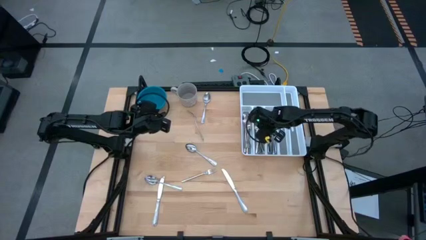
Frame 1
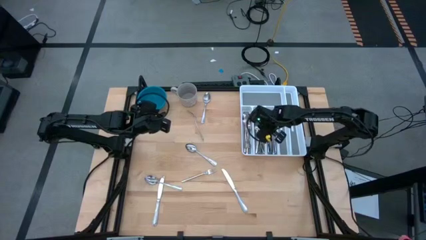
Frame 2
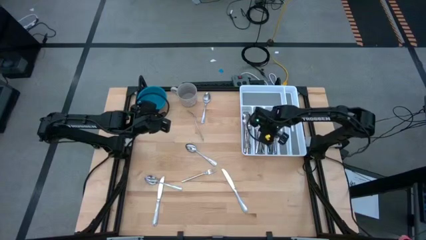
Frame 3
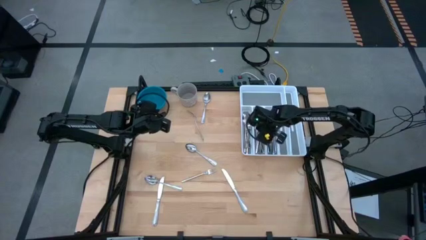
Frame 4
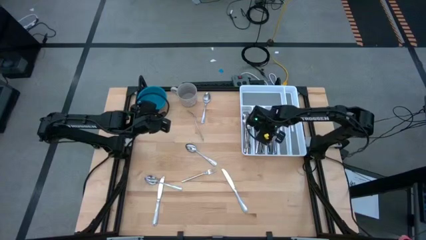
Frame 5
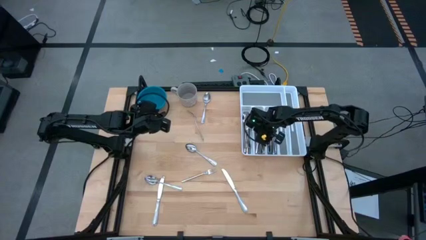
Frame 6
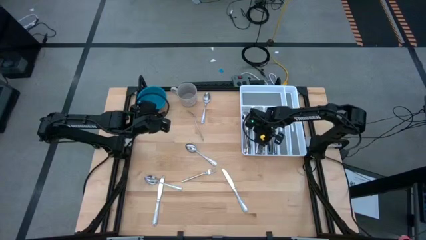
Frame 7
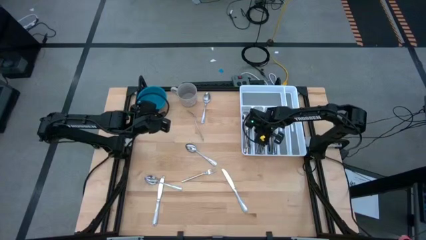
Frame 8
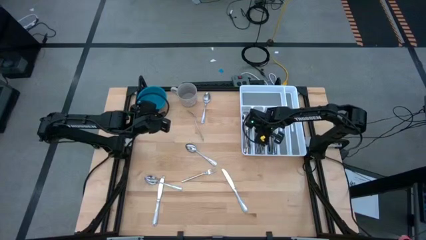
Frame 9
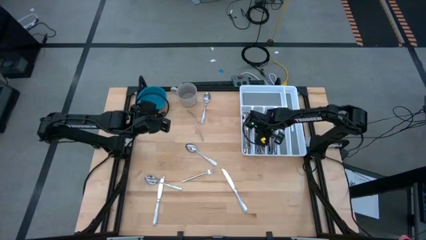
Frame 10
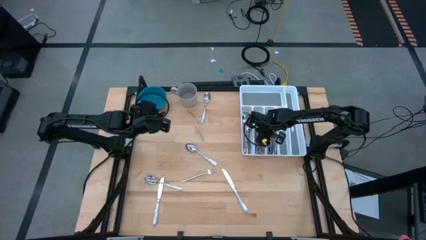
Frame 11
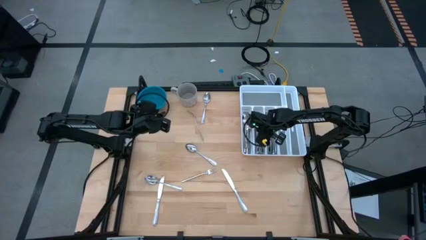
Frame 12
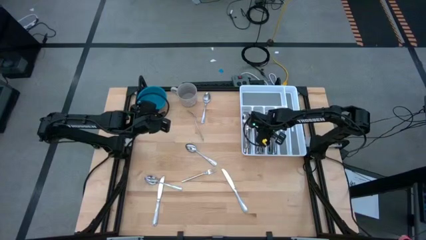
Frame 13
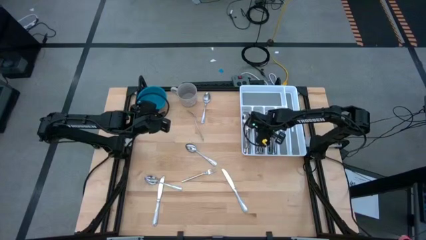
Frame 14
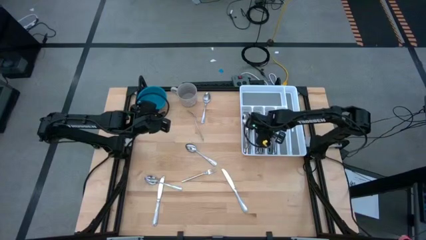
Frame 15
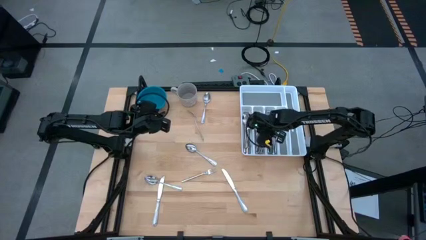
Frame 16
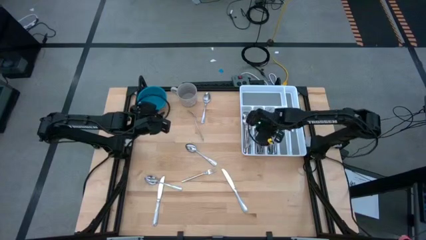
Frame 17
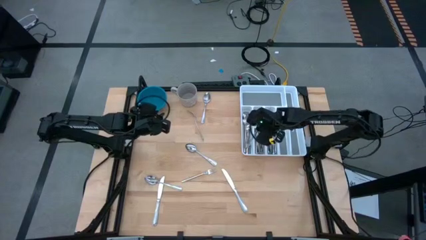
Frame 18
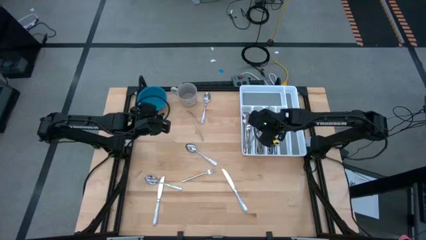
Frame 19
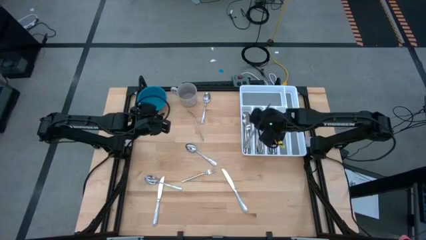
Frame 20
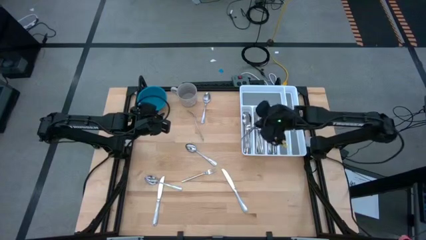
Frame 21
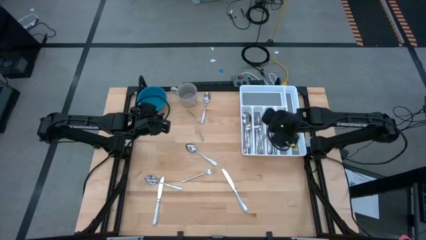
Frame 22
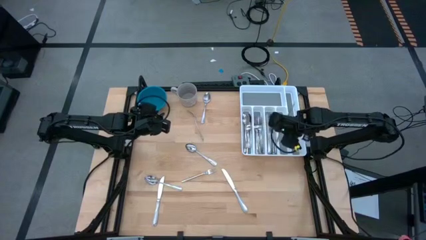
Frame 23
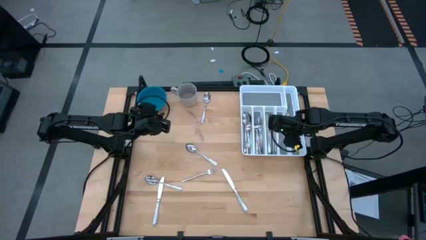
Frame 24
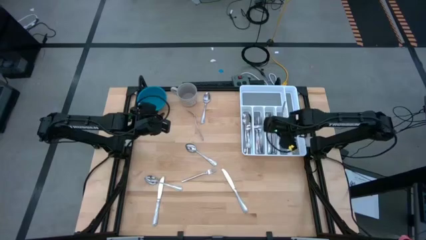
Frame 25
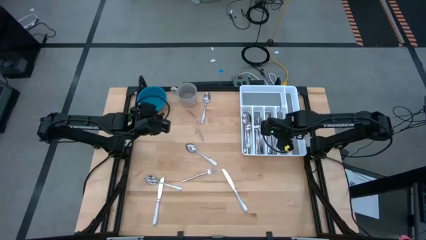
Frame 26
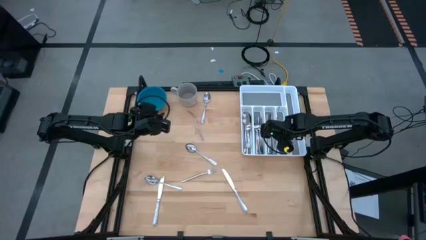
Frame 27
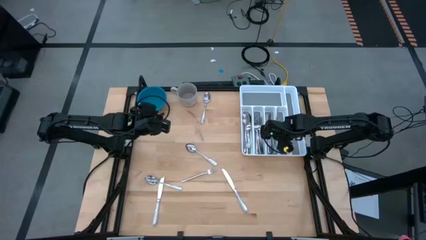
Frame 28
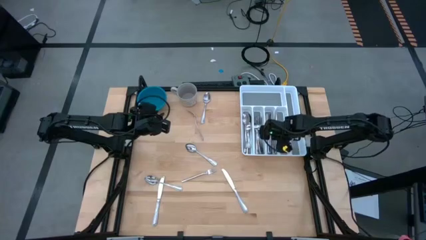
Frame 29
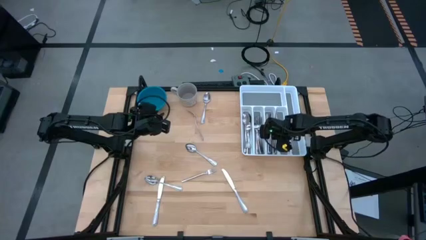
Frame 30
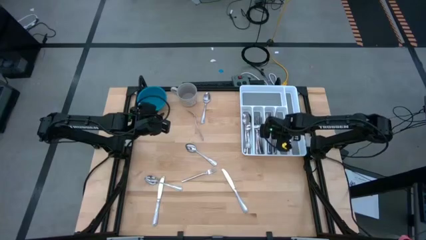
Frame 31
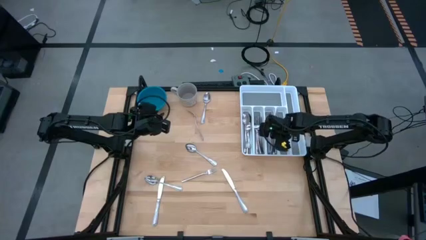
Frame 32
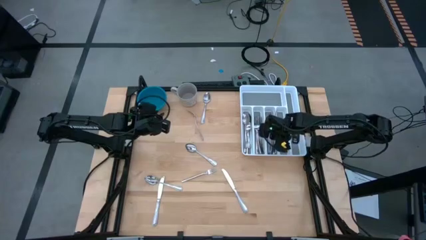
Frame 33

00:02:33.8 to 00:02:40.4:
Task: Sort silverware
Adjust the table knife in the silverware tray

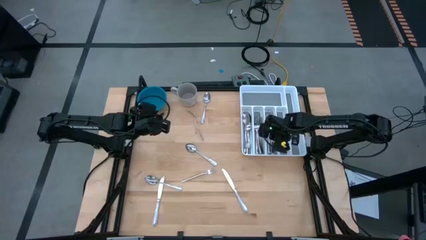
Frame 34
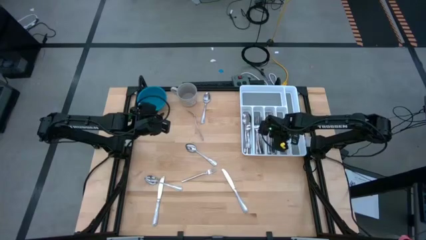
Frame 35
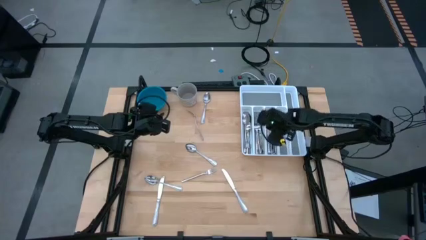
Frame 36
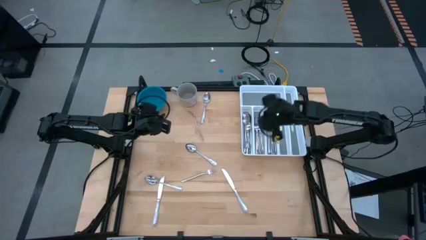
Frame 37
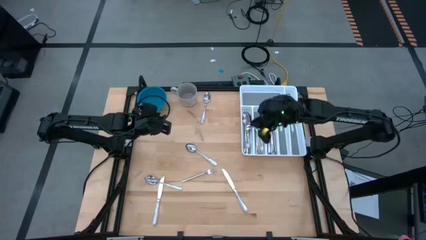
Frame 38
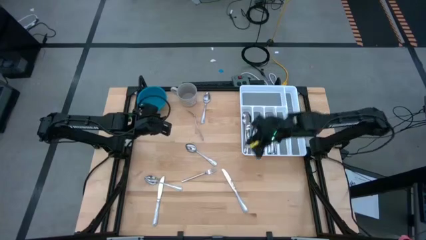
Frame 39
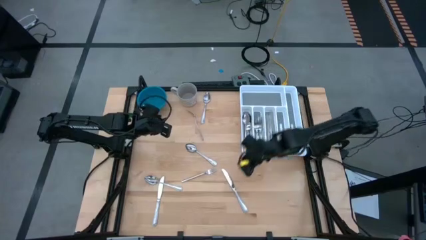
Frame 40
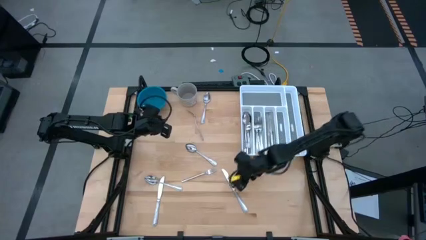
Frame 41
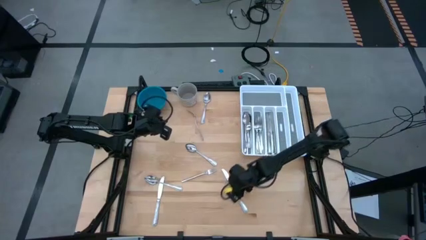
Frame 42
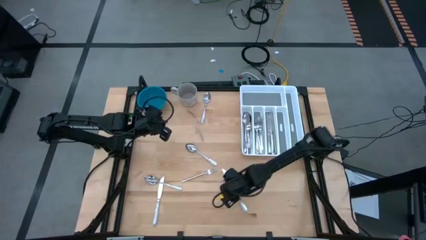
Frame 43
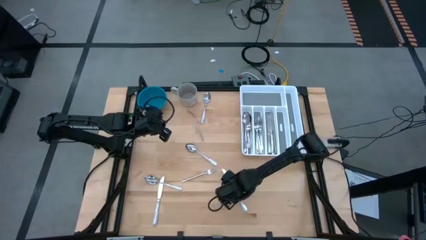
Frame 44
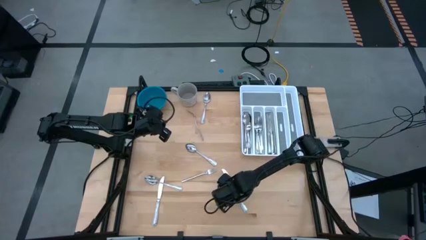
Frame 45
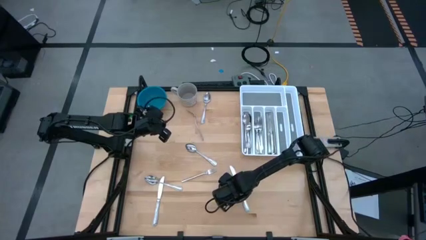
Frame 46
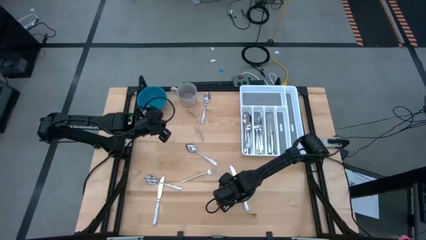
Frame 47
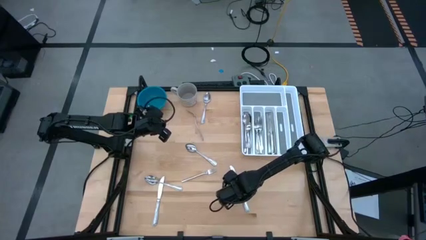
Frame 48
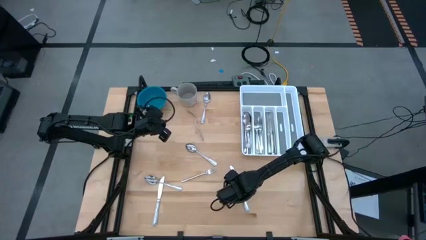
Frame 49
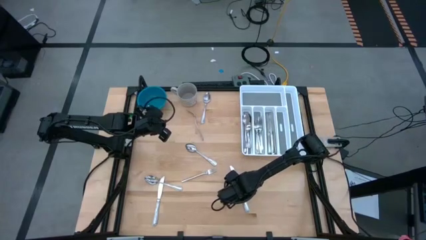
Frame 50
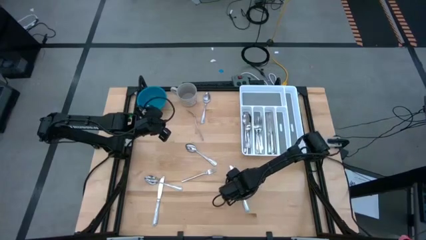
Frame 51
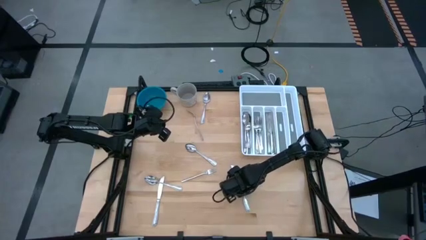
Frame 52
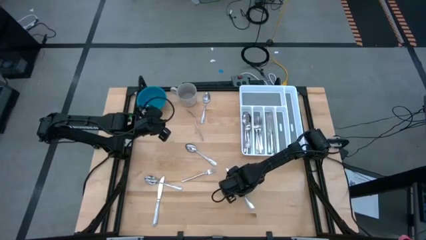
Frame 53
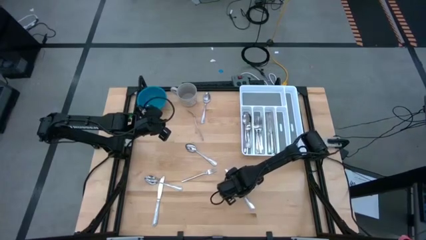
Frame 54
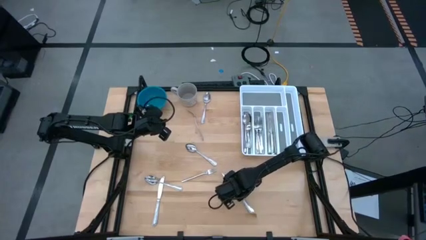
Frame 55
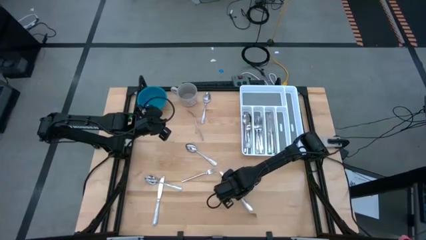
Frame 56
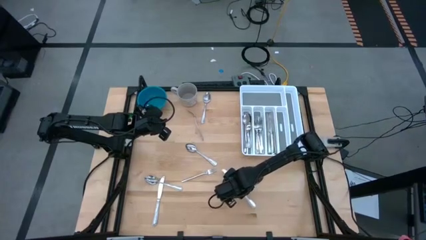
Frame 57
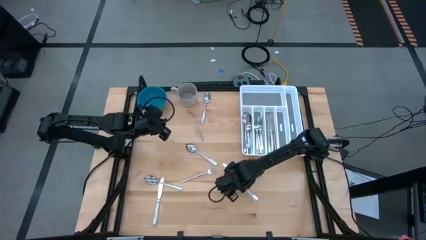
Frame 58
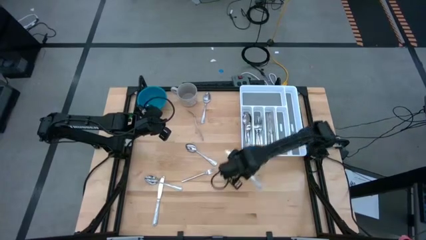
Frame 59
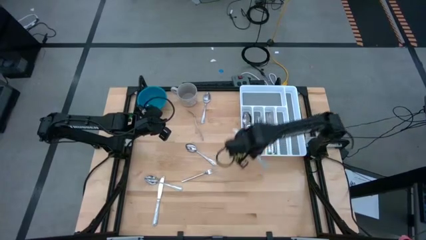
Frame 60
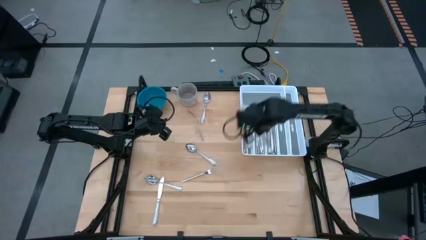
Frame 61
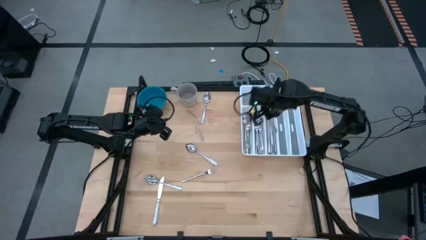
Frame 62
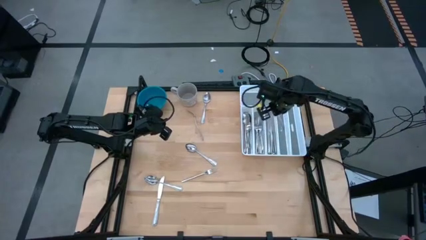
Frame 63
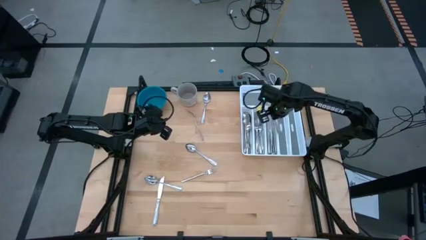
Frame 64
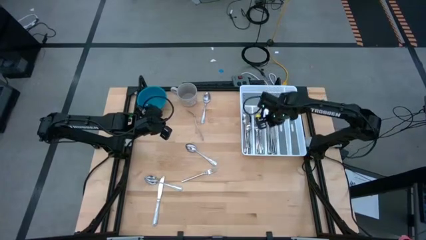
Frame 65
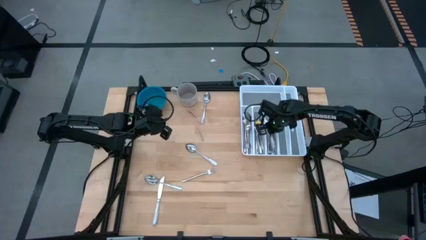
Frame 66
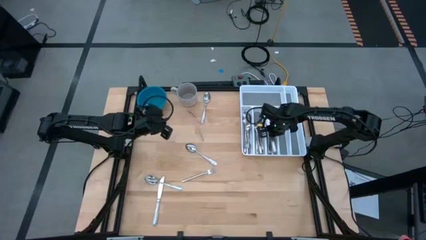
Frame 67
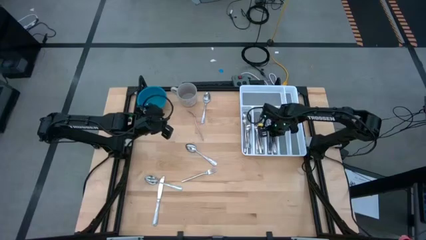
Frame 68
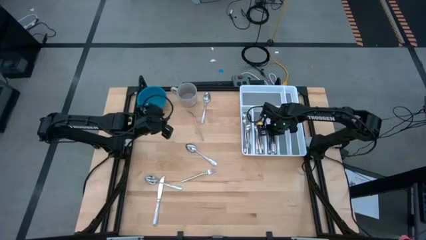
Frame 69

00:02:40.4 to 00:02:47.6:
Put the table knife in the silverware tray

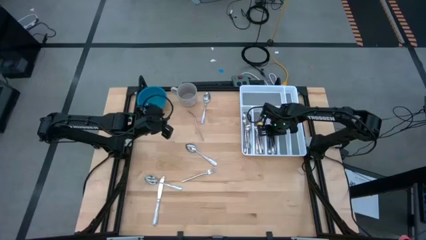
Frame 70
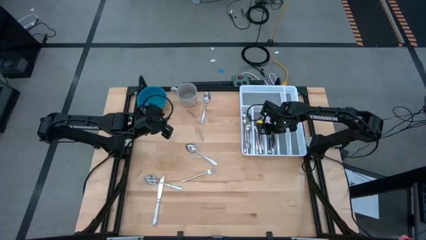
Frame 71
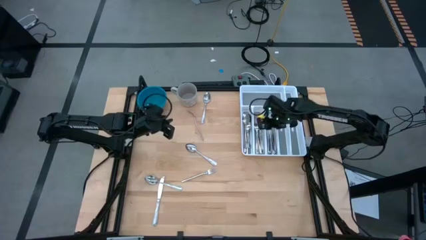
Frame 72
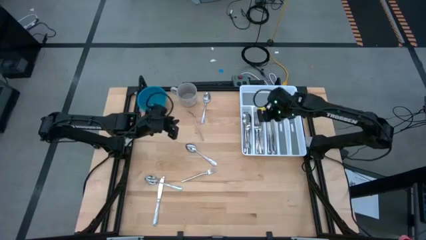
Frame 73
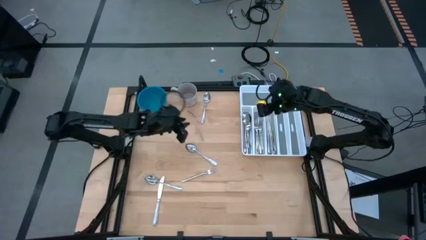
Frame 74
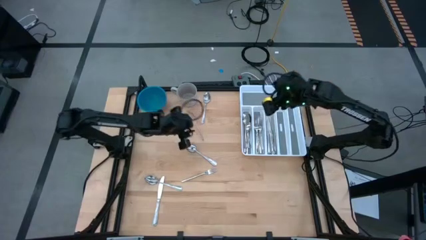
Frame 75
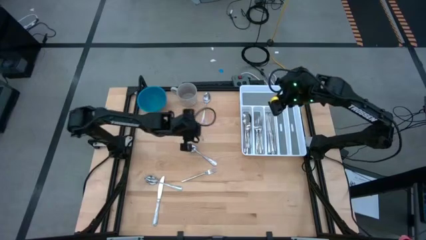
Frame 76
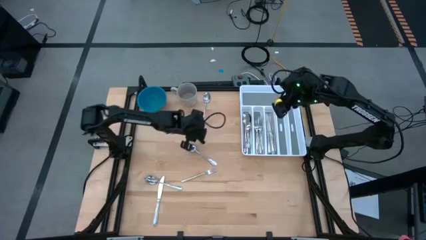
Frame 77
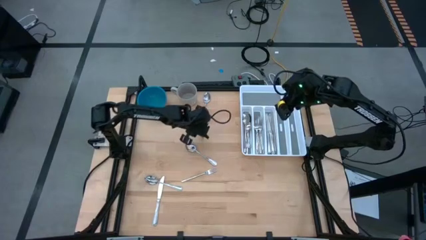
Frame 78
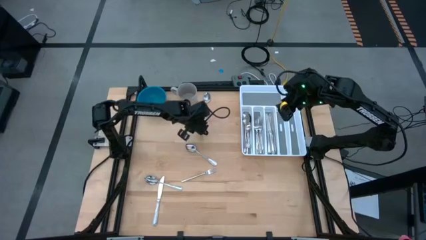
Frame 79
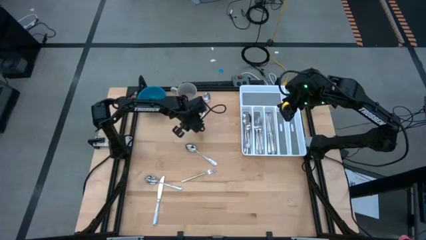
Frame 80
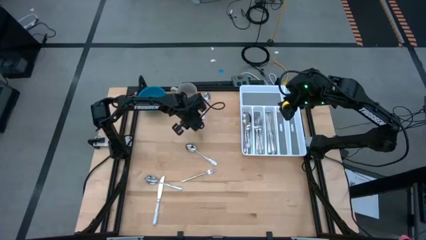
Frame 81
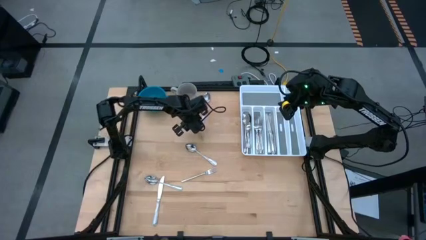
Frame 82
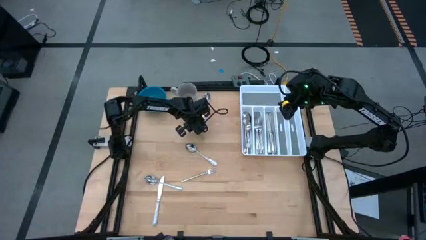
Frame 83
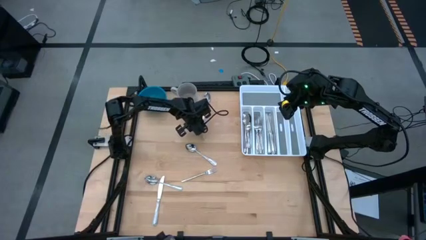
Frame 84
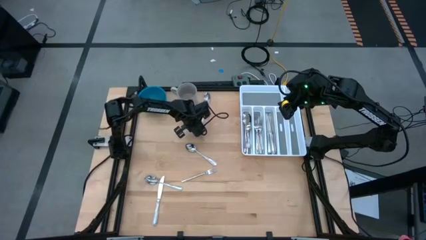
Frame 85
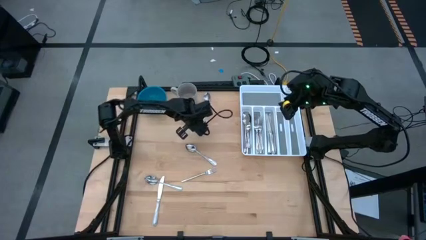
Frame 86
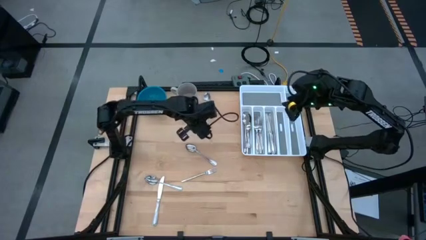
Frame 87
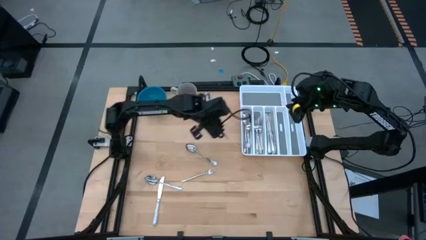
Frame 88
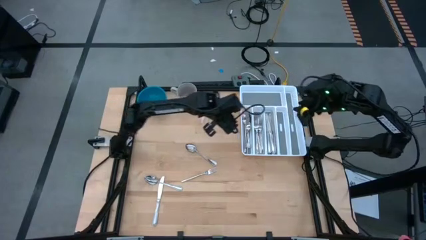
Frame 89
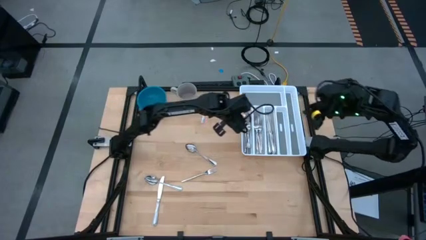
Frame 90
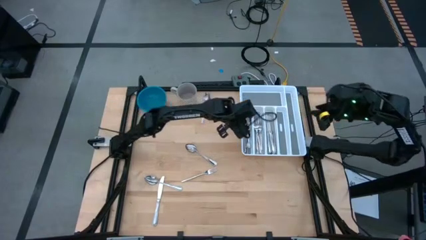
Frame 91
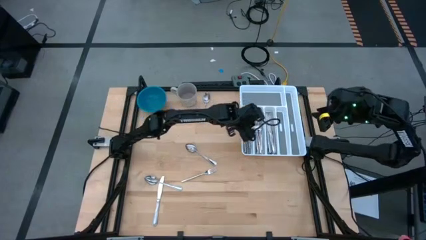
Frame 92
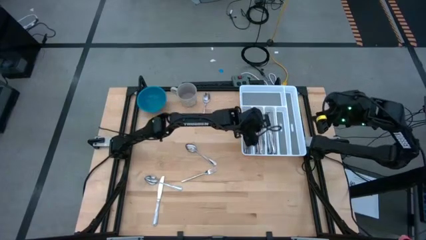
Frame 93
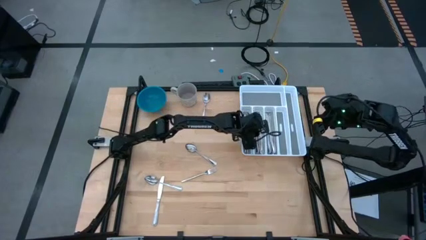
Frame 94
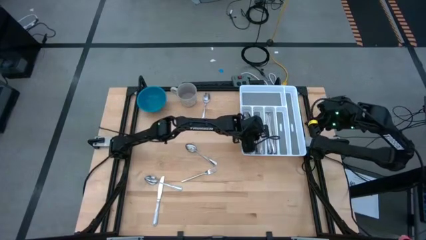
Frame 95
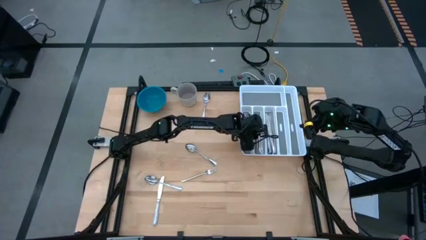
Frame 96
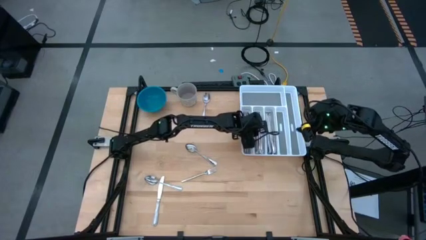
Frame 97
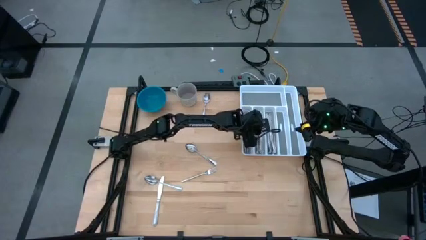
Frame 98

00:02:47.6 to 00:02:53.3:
Put the fork in the silverware tray
